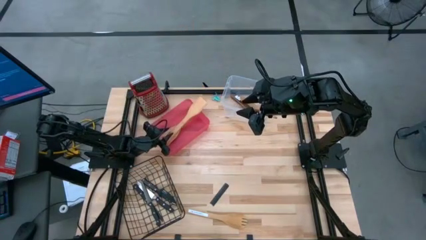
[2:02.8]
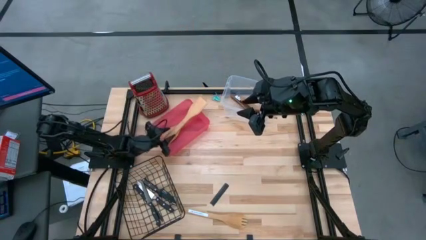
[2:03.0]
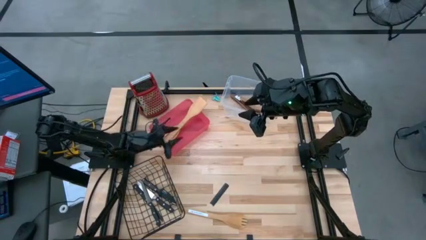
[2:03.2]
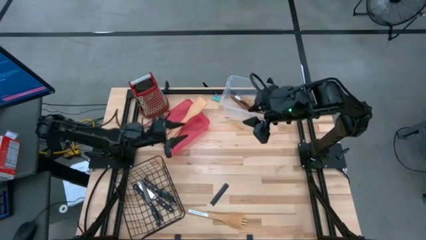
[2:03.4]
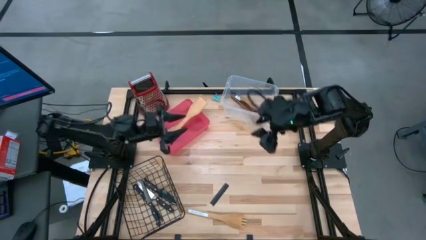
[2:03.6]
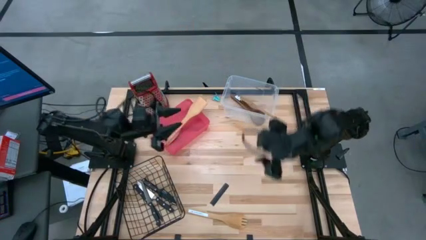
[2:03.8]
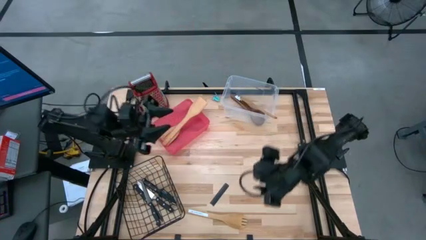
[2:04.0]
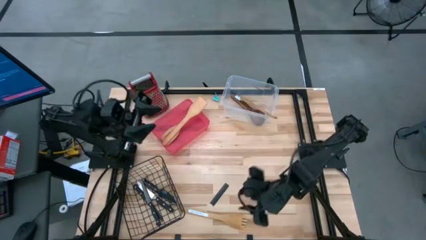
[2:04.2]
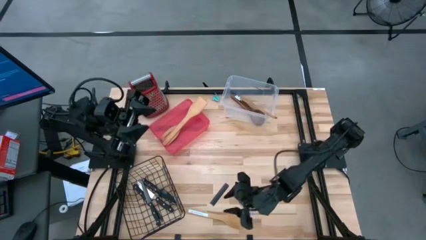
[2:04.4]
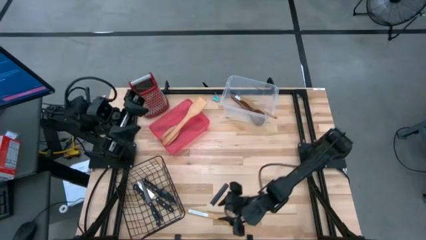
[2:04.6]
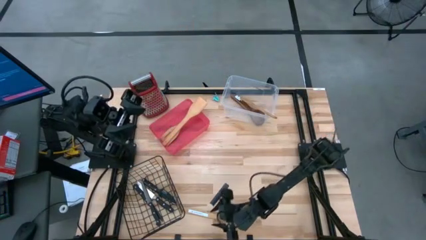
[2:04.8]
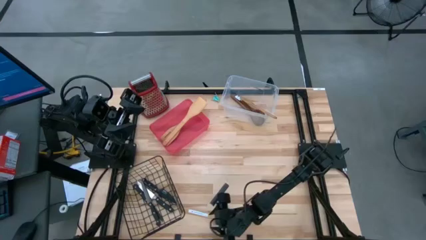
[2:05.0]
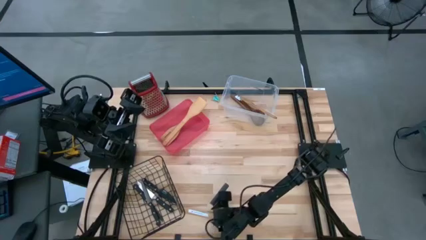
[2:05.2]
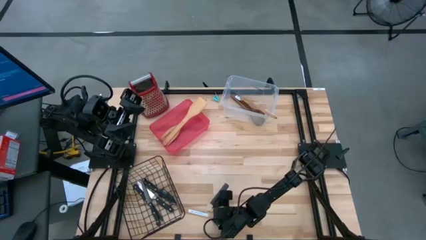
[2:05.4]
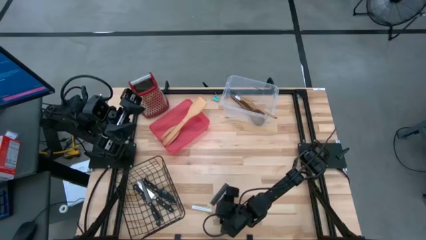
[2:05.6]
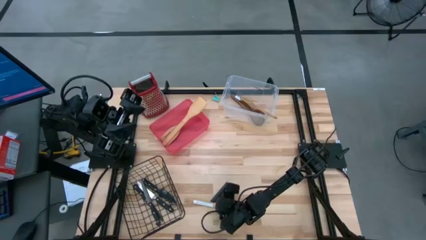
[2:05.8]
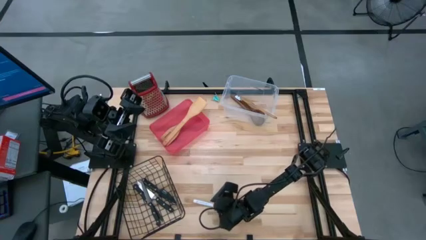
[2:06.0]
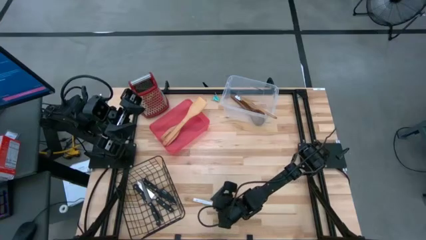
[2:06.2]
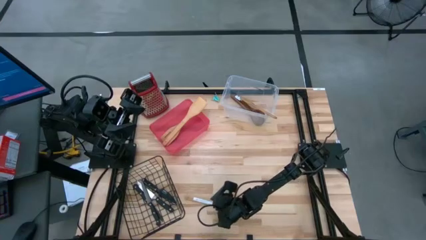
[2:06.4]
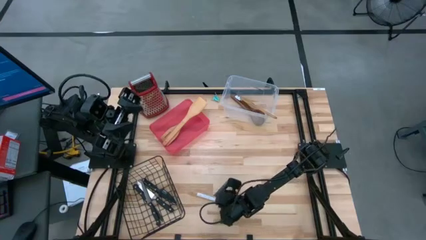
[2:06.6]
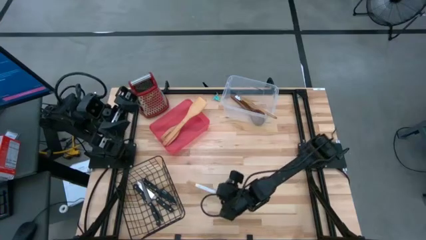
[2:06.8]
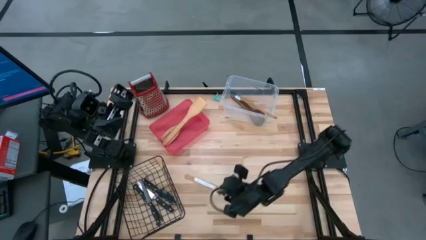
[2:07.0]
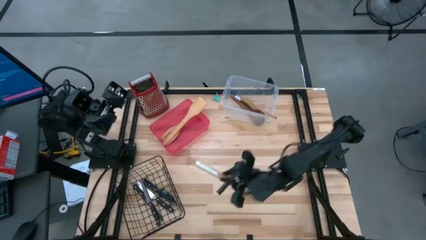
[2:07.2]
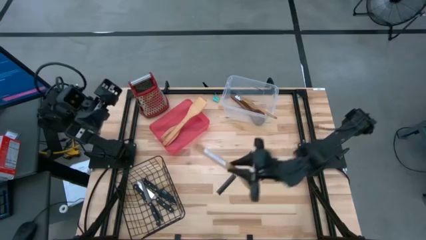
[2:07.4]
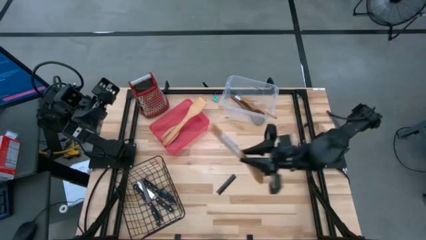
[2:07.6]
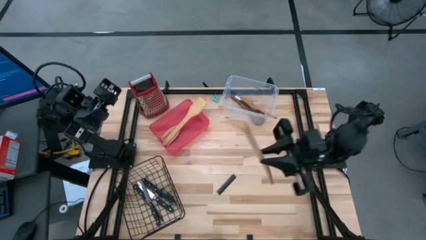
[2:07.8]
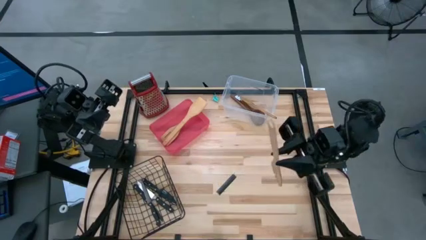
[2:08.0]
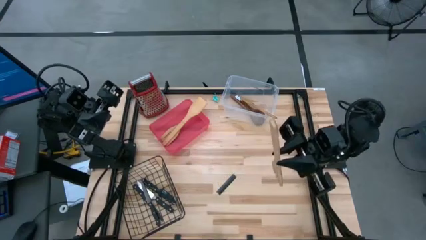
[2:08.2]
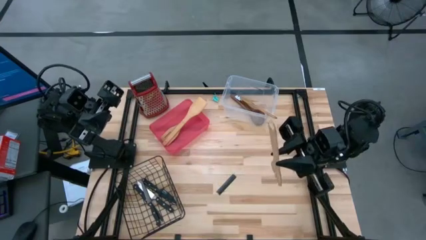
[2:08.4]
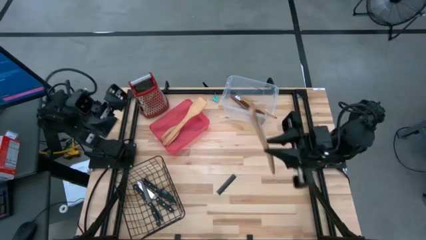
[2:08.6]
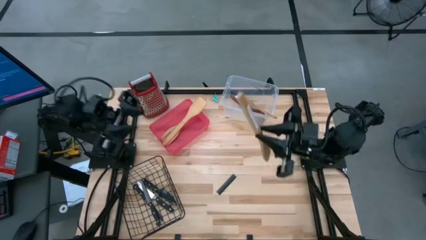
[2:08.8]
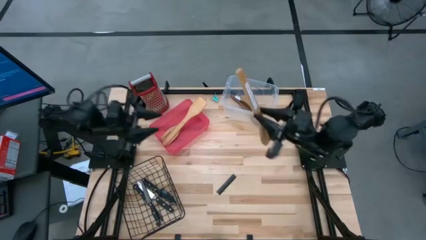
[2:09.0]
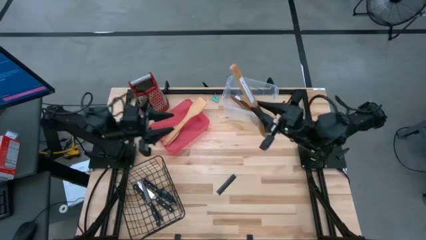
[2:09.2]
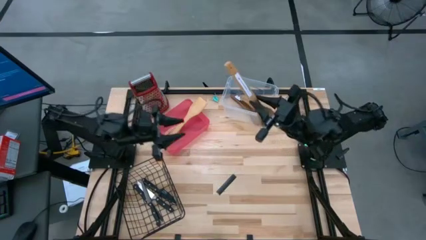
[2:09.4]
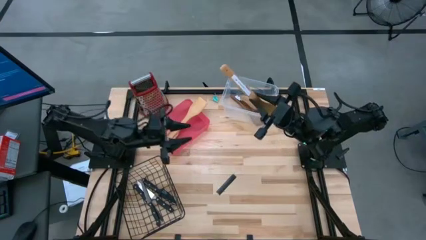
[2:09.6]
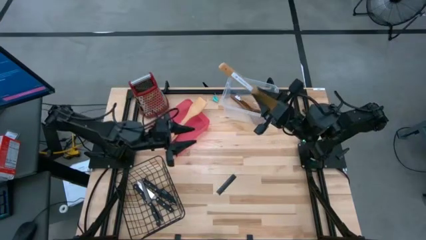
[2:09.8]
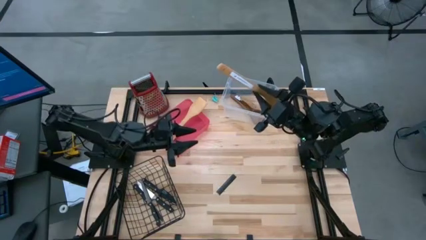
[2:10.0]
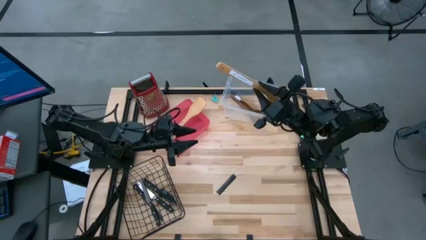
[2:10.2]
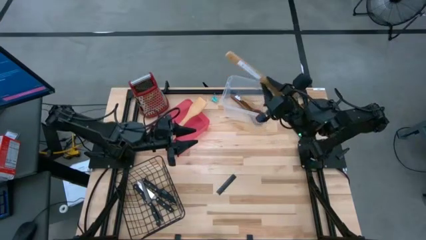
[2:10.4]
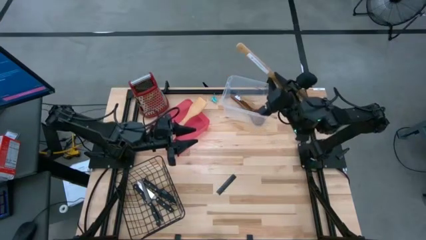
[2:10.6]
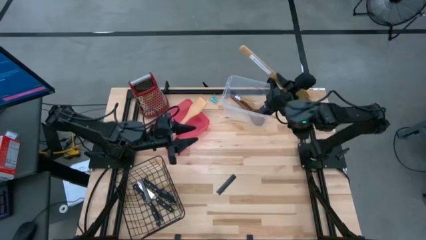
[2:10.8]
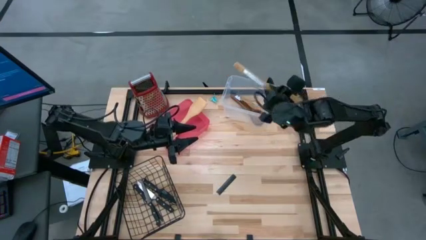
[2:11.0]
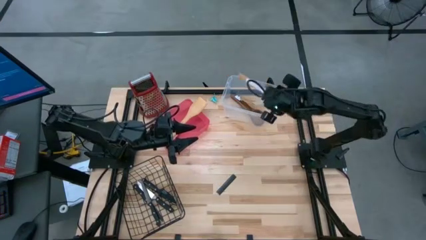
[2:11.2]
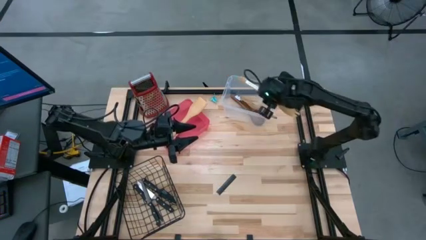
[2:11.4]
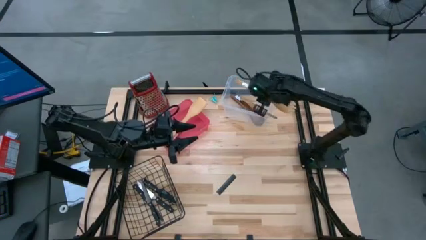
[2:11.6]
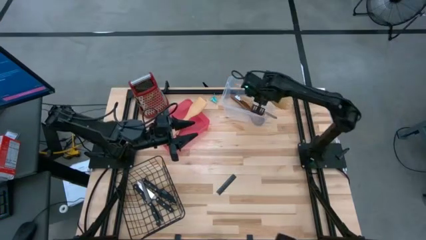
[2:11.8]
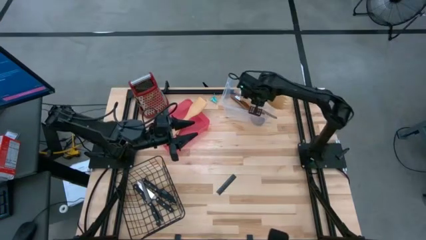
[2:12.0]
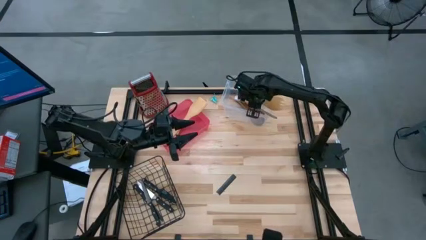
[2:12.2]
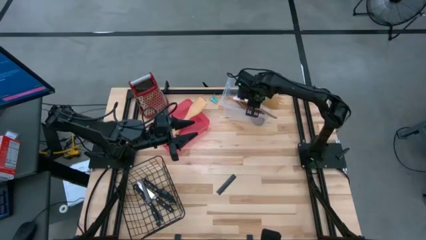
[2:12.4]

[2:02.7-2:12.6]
Task: Pick & Place Kitchen Items
Put the wooden serving spoon into the transparent bin

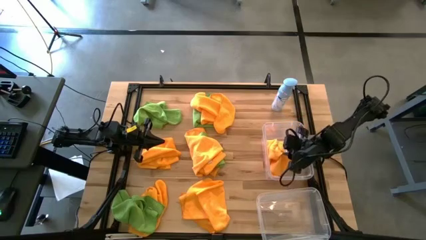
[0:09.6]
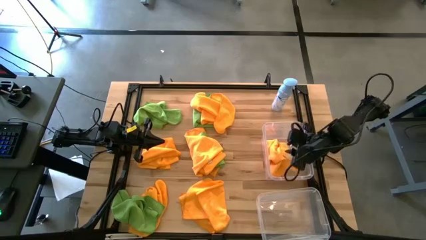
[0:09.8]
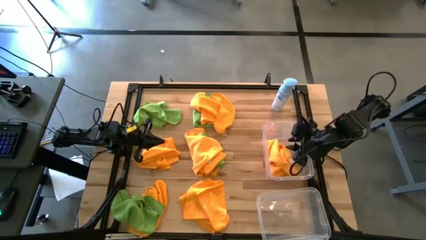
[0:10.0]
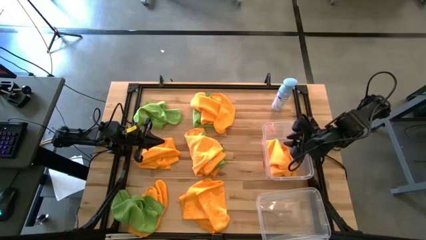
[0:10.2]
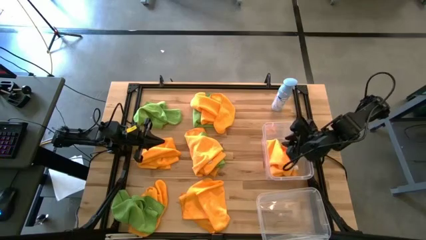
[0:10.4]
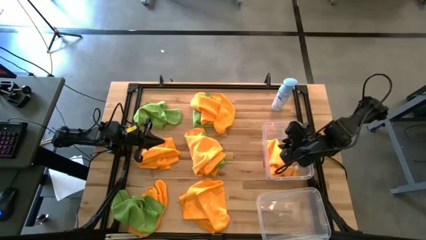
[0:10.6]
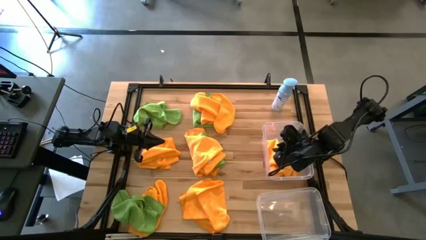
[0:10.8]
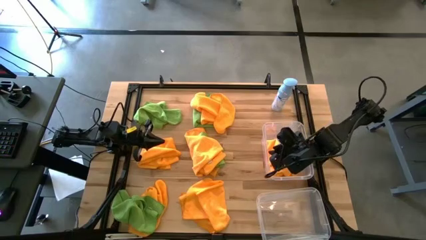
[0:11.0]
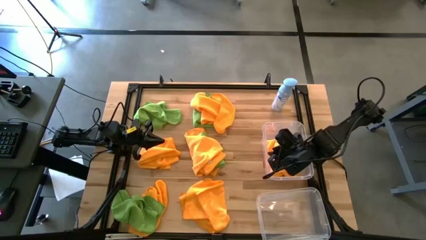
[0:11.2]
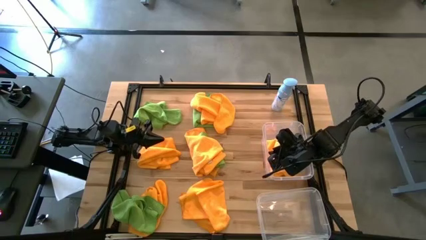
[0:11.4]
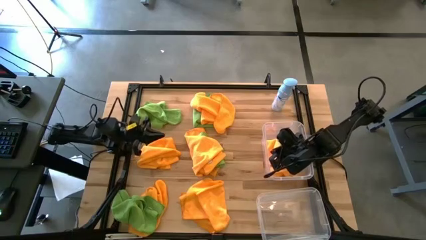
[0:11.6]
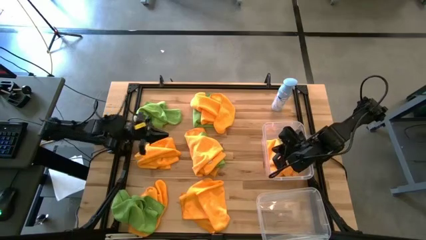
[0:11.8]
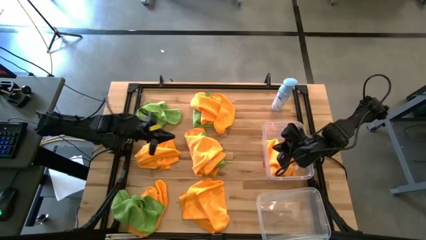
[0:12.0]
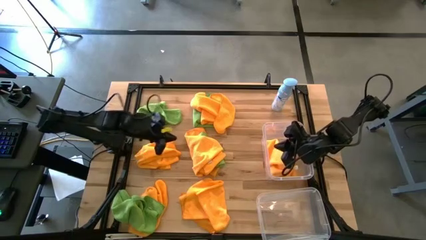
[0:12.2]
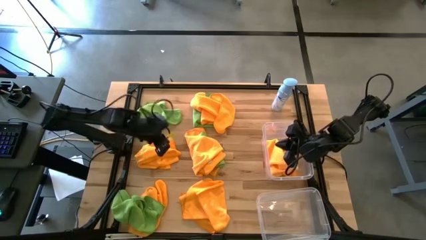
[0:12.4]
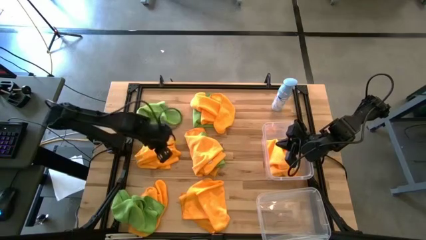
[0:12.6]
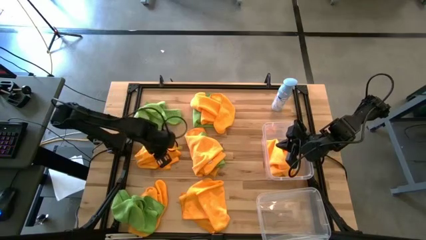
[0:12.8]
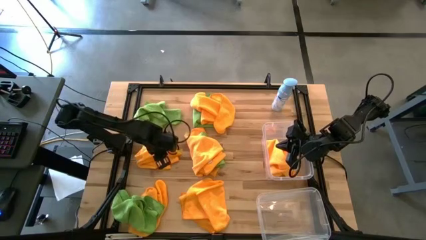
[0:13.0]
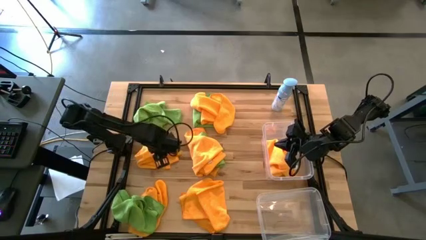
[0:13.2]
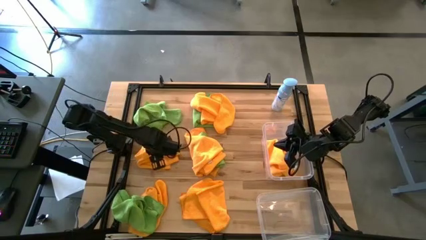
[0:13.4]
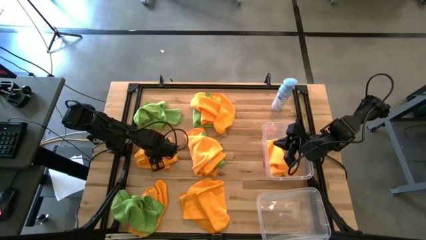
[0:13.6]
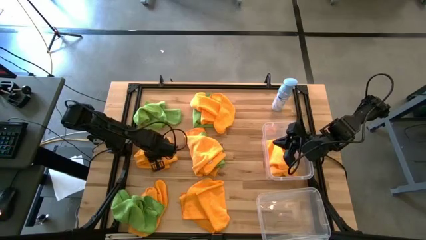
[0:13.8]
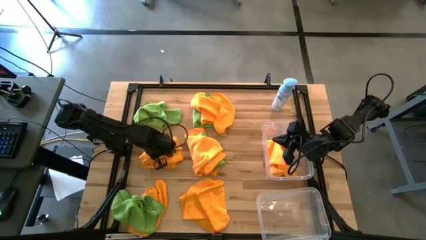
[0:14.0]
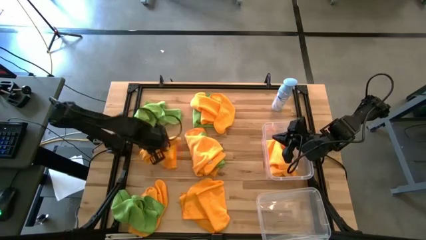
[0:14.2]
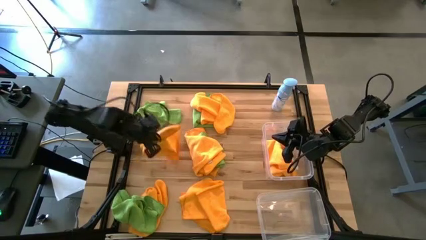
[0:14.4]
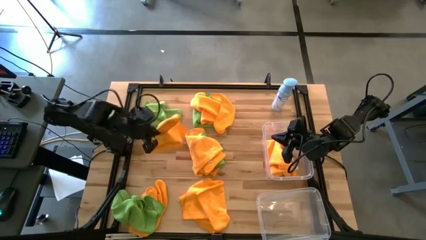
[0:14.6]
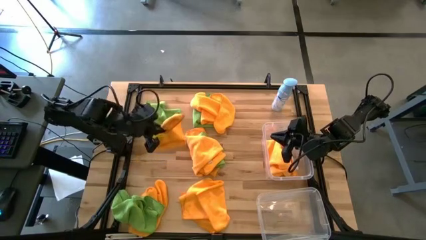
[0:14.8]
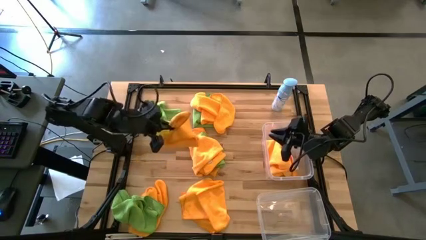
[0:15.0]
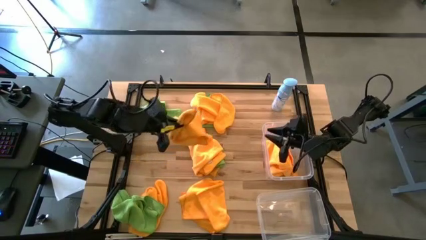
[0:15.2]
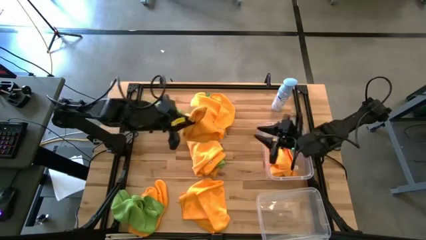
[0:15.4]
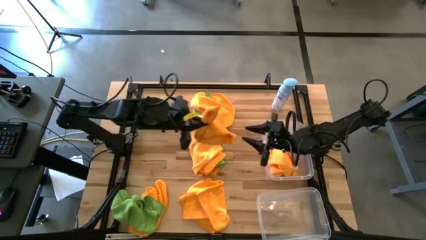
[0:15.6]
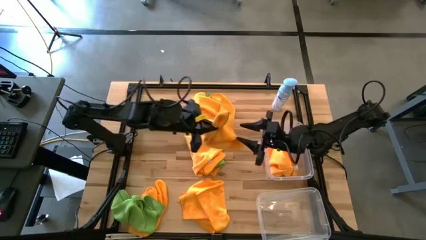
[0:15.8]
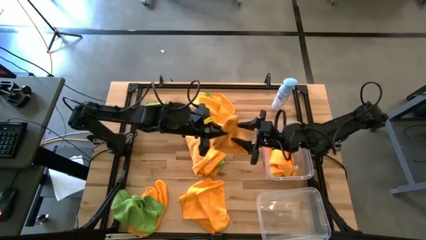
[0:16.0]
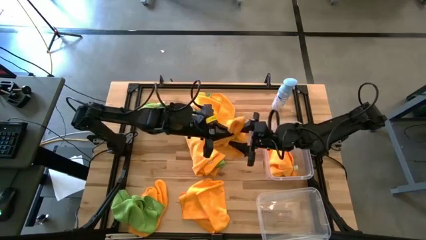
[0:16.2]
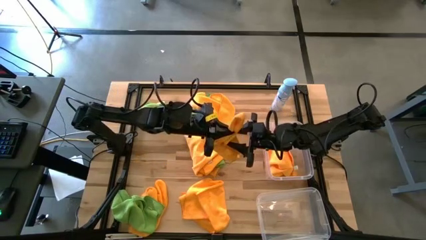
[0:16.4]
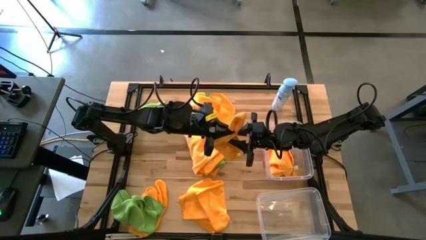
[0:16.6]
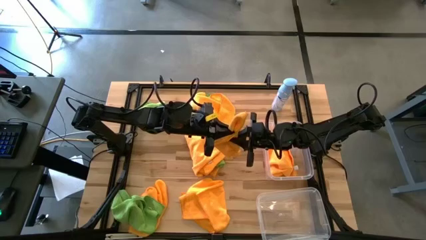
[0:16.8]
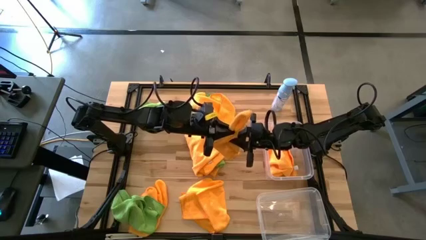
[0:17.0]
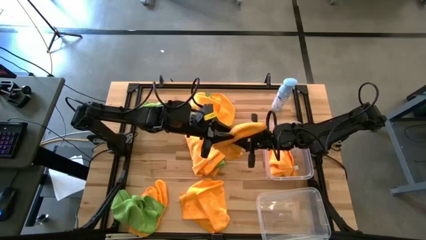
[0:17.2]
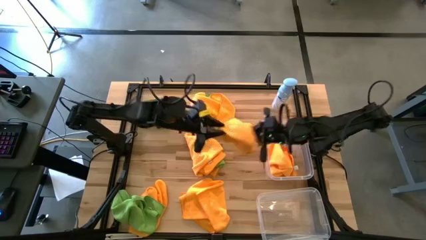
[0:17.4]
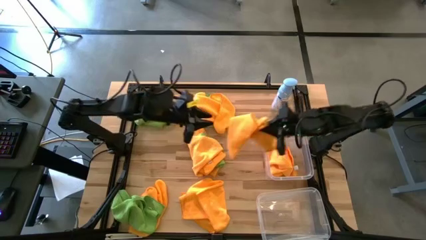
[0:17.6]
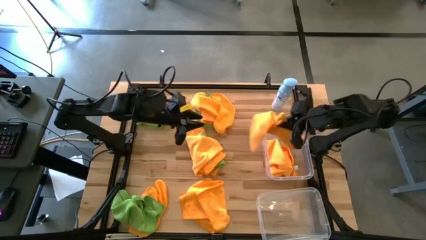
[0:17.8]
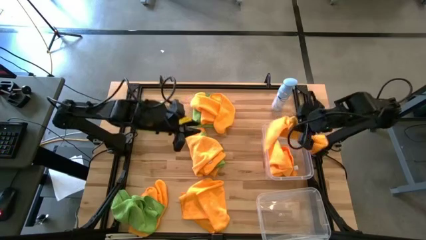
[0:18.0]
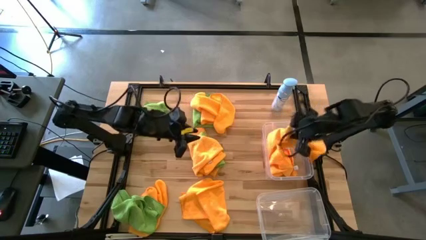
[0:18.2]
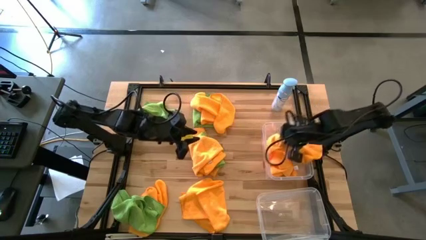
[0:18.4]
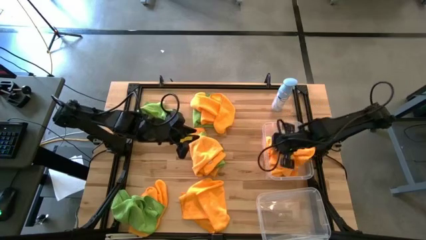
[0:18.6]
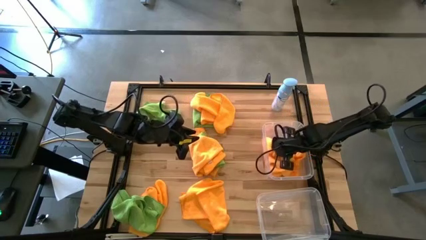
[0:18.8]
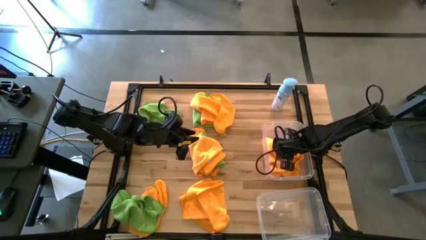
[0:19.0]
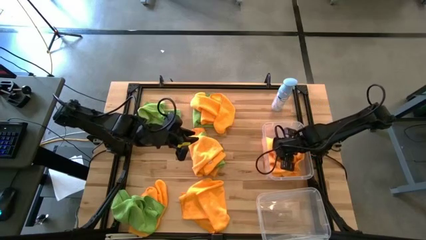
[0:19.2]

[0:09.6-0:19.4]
Task: Sort microfiber towel by color & place in baskets
Put the yellow towel into the top transparent bin
